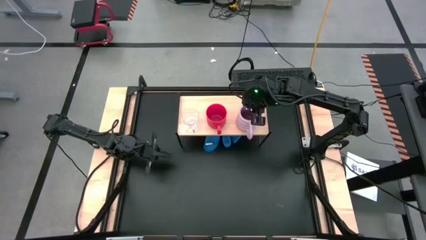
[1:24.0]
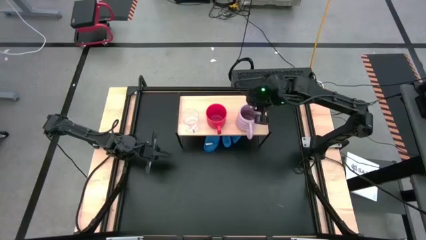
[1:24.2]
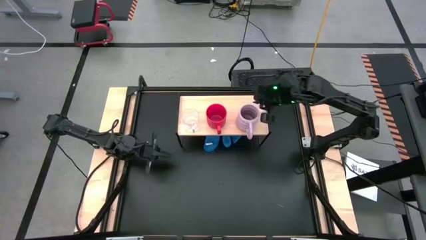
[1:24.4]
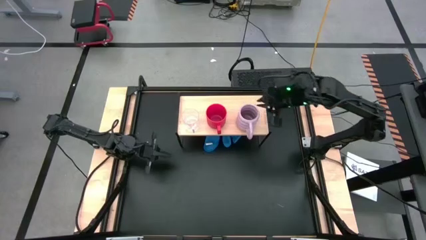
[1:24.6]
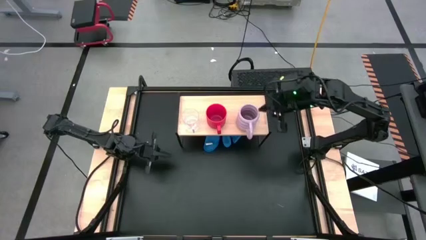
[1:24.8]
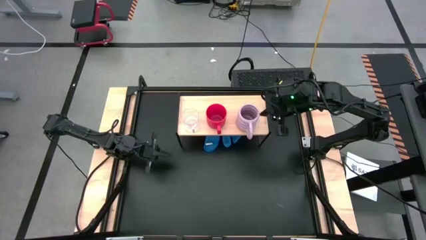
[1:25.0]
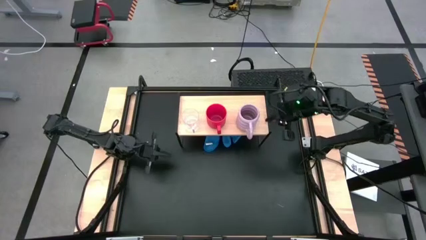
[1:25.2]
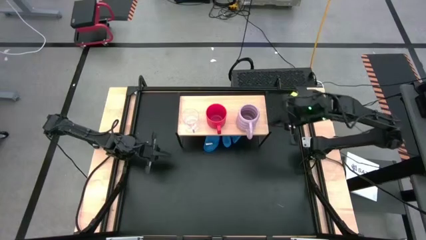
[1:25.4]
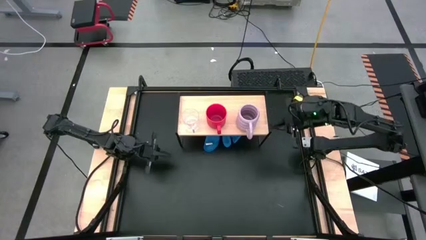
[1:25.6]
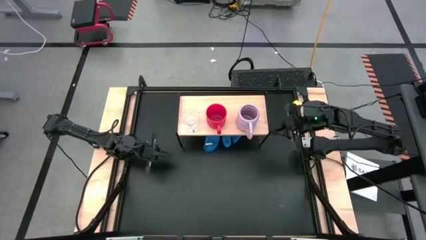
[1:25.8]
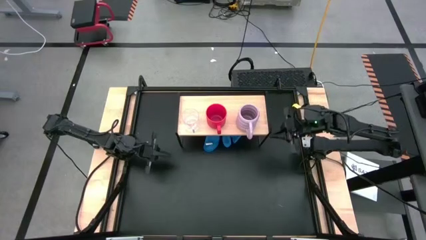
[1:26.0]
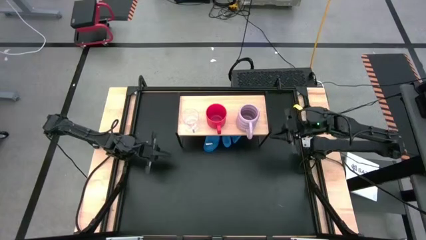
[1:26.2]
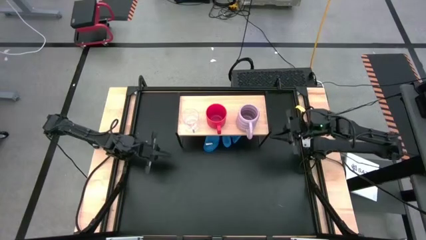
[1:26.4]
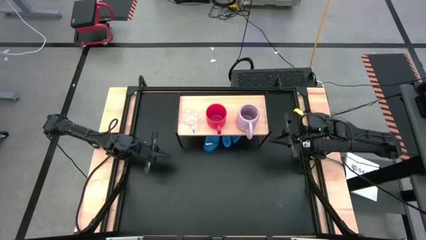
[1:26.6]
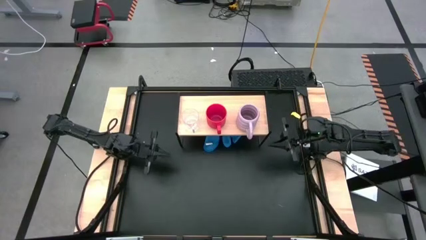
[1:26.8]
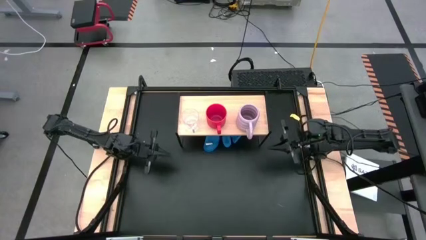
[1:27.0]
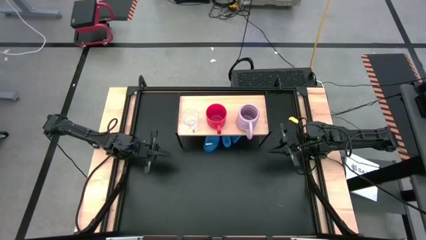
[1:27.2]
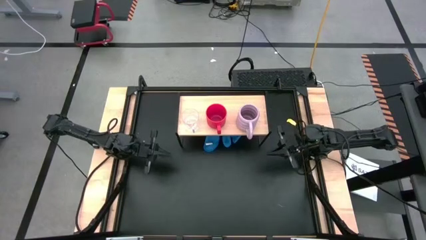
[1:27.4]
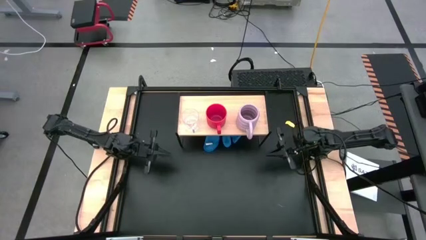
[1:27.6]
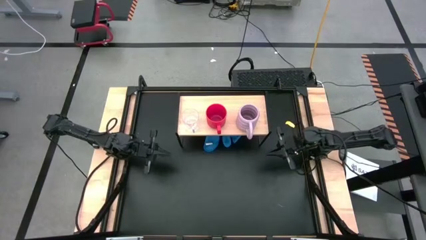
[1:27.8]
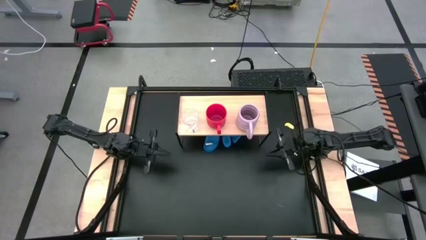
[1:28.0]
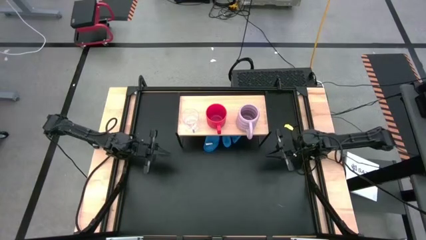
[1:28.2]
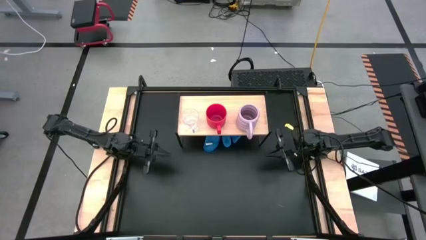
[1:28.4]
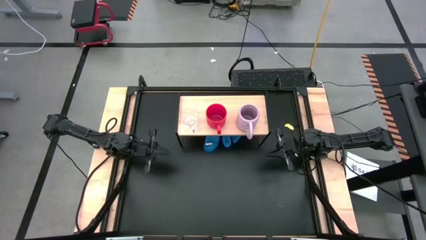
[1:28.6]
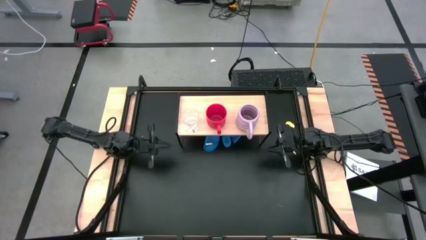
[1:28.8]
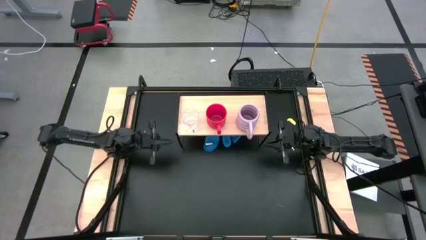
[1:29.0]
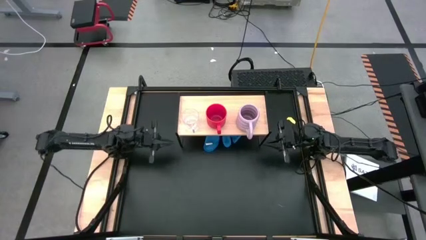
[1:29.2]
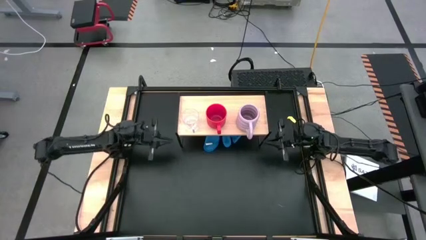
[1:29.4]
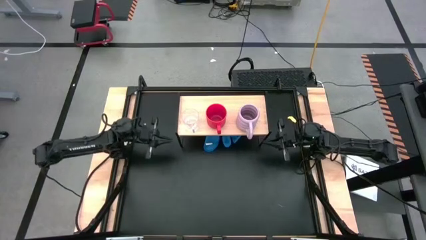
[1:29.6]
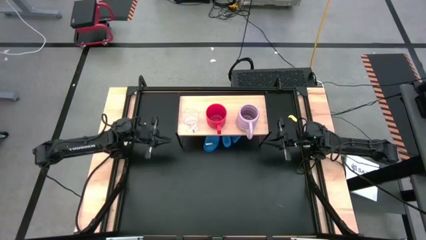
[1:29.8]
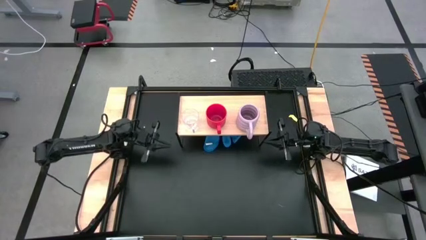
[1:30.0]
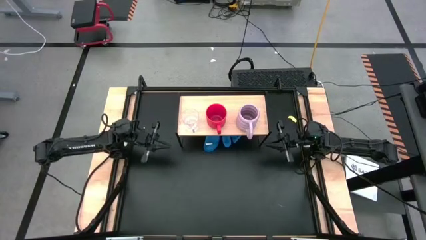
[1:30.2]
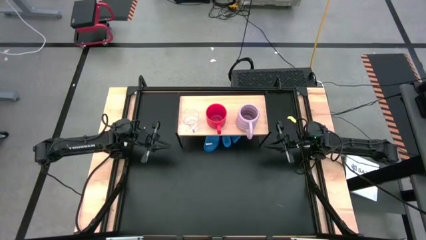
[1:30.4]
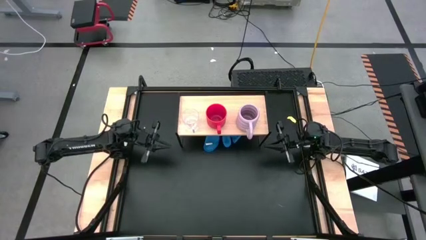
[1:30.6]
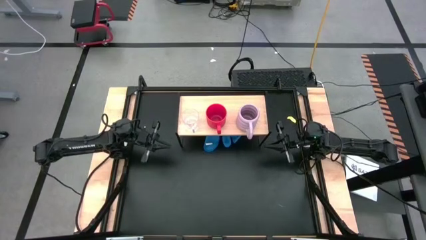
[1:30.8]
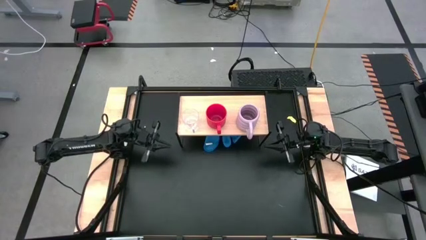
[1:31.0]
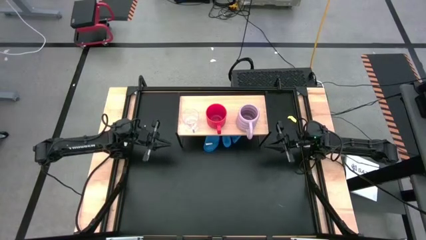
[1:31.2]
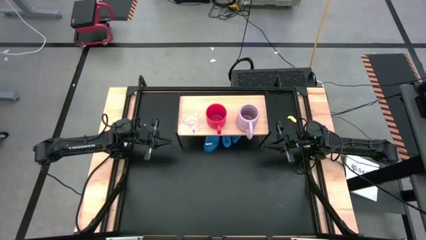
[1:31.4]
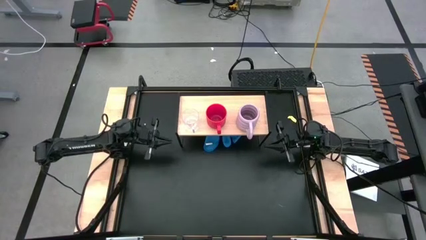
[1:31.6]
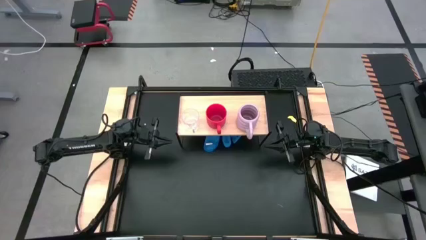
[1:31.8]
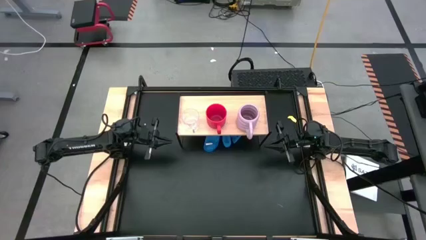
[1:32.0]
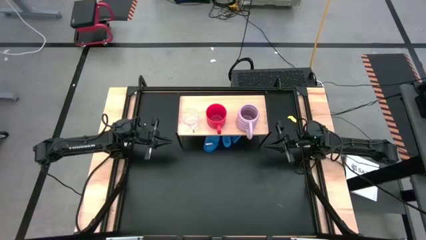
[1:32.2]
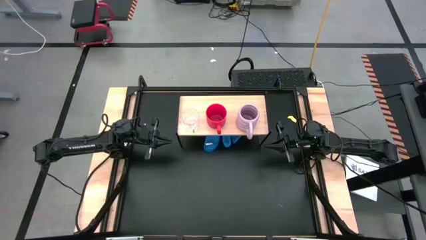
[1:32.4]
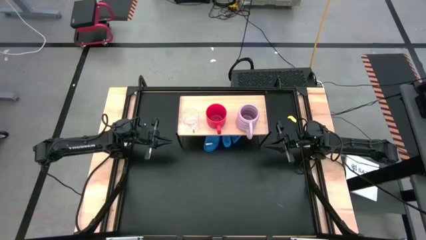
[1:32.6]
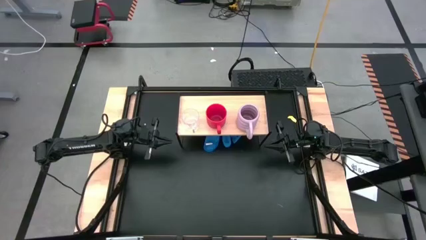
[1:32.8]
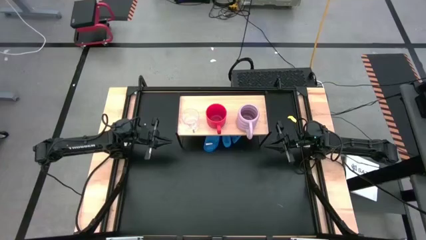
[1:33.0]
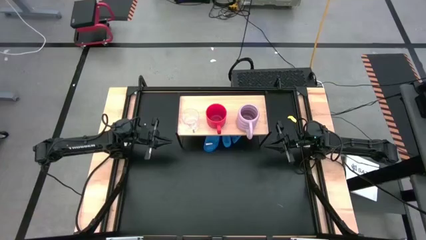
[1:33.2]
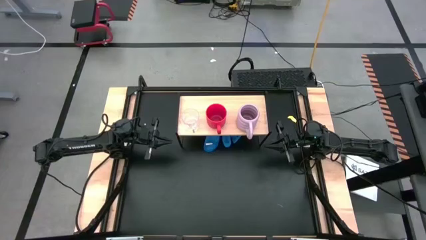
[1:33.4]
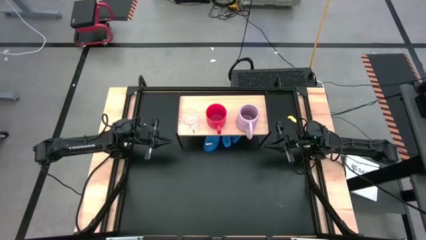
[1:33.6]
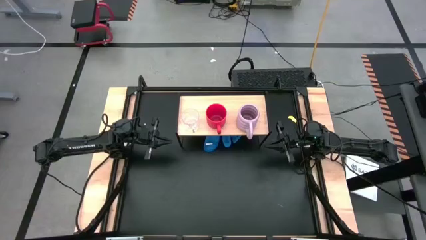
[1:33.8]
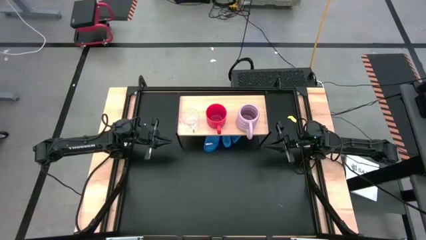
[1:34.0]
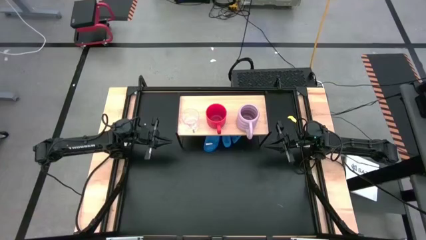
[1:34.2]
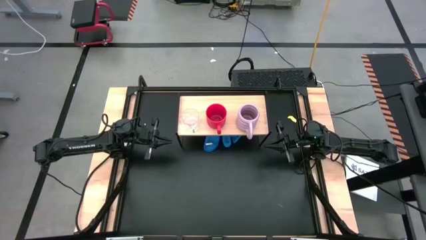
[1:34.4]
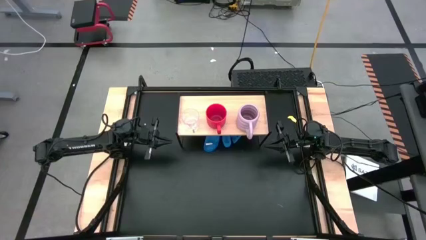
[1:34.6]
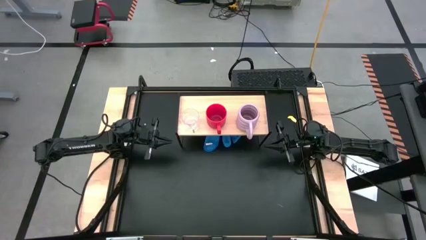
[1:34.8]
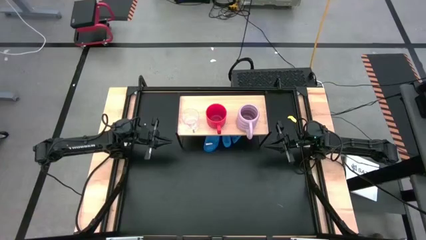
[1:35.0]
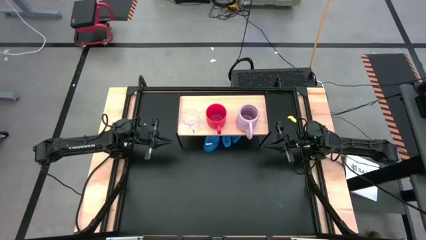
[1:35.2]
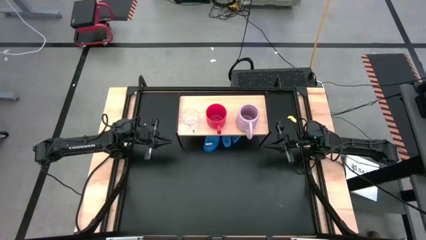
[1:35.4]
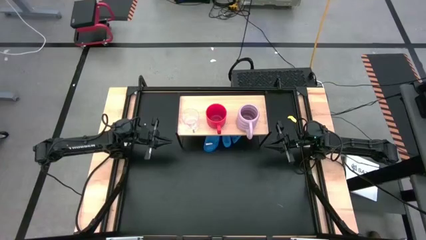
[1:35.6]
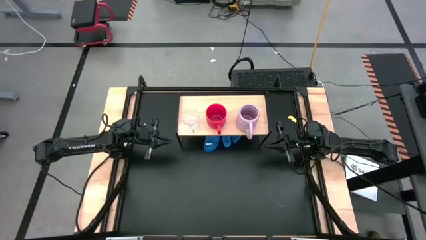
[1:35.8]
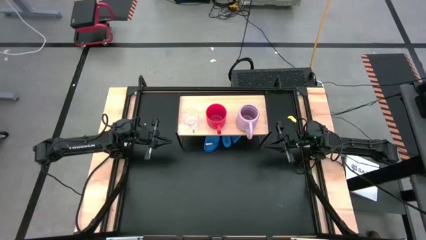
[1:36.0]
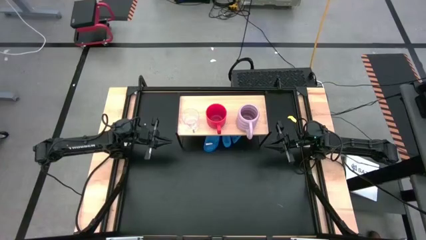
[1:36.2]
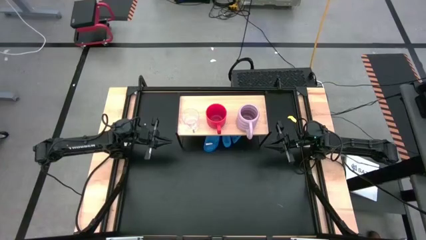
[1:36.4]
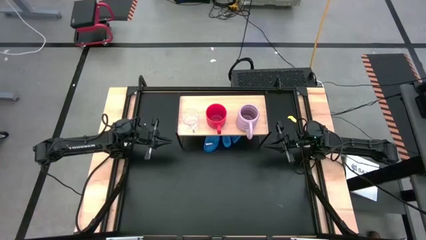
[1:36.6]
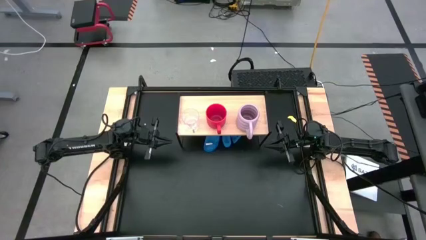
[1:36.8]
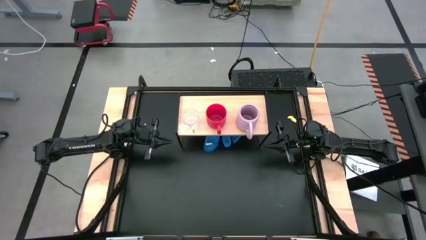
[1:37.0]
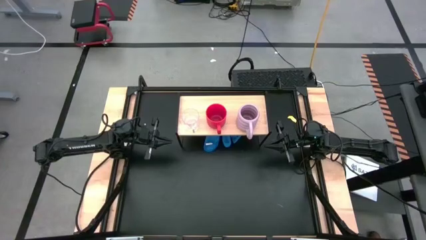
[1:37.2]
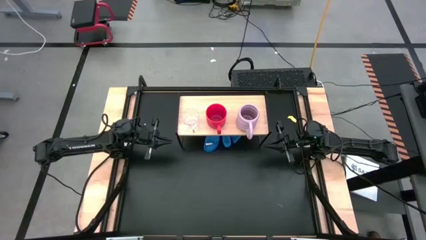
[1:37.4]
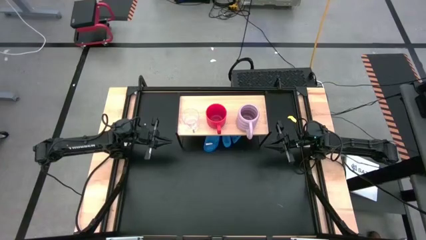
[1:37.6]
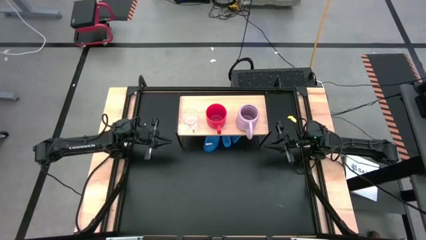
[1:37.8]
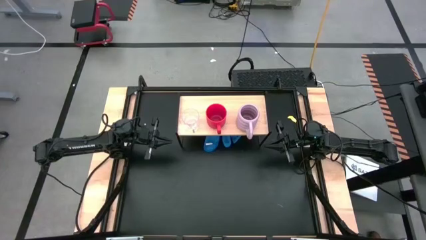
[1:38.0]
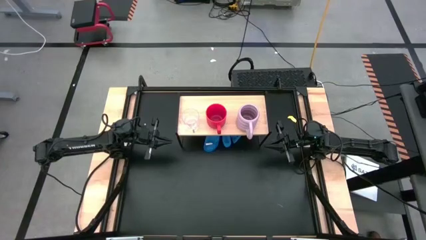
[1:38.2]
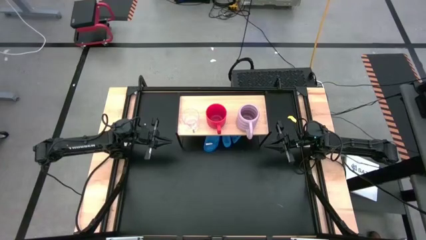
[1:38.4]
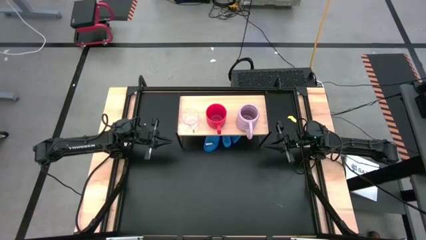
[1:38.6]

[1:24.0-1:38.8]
Task: Stack small to large cups/mugs on shelf
Return to Home Position
